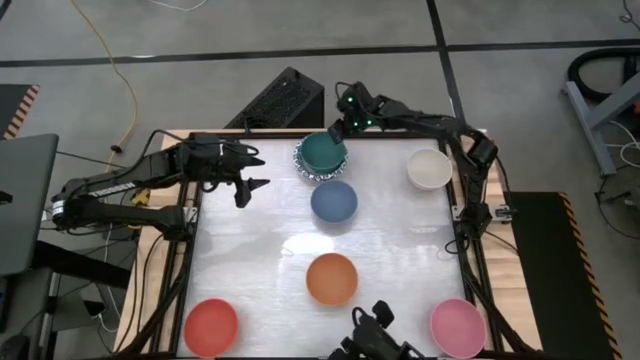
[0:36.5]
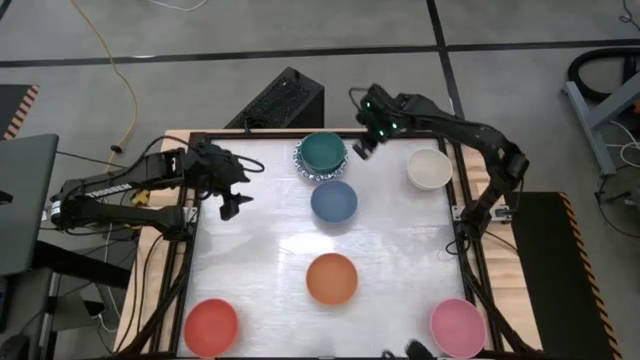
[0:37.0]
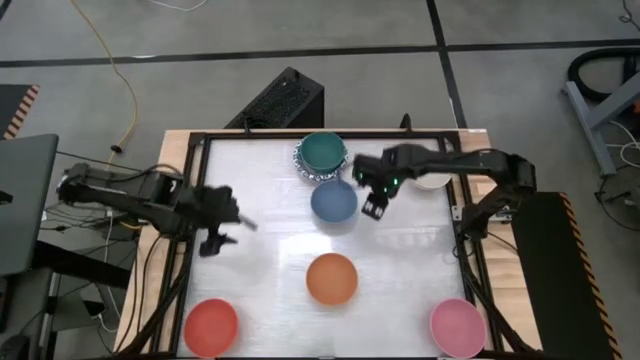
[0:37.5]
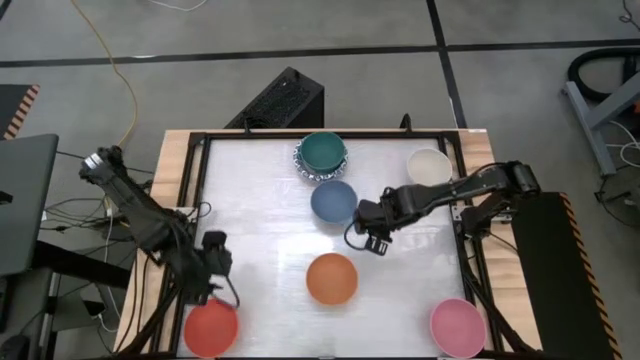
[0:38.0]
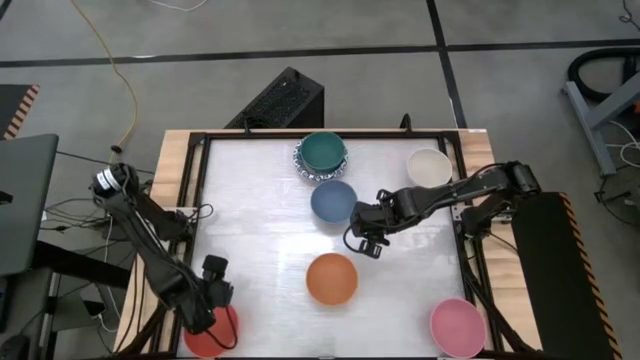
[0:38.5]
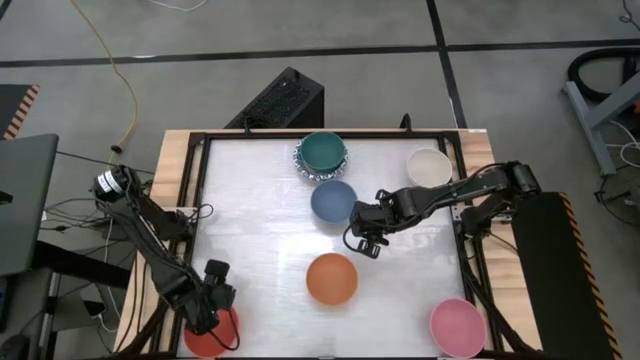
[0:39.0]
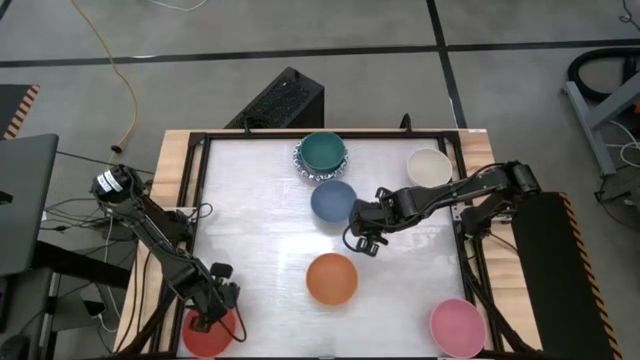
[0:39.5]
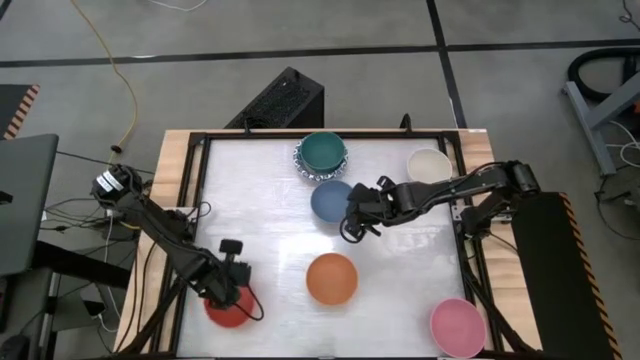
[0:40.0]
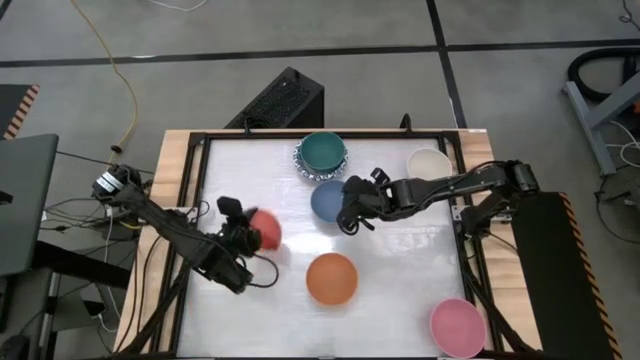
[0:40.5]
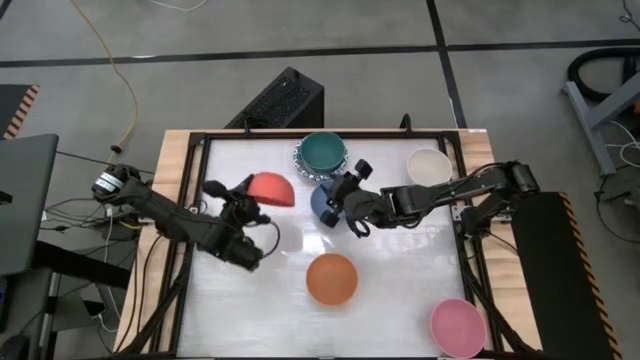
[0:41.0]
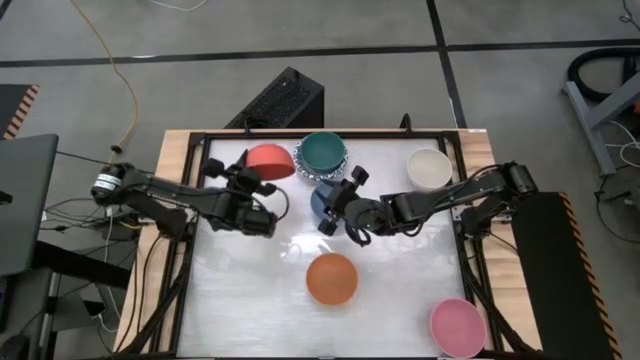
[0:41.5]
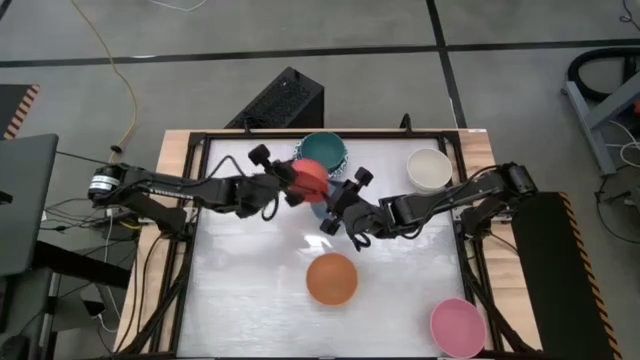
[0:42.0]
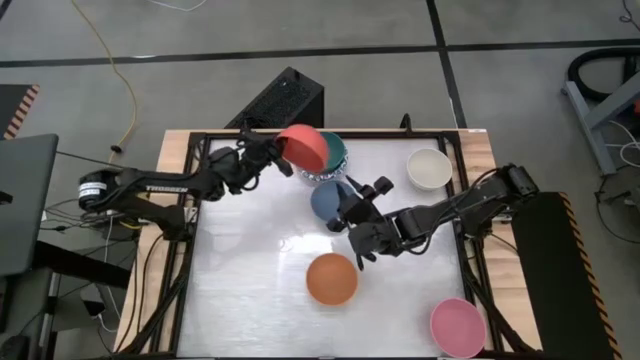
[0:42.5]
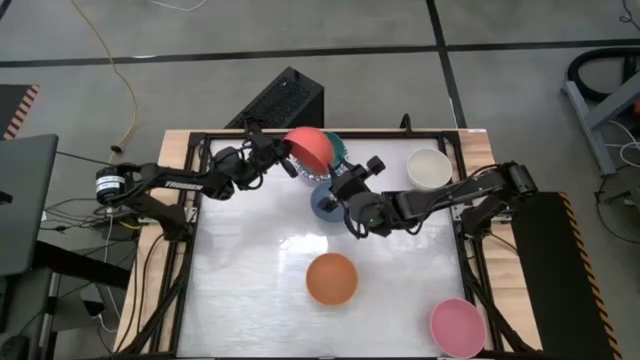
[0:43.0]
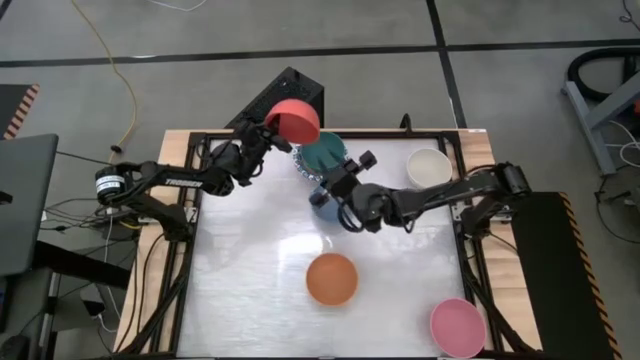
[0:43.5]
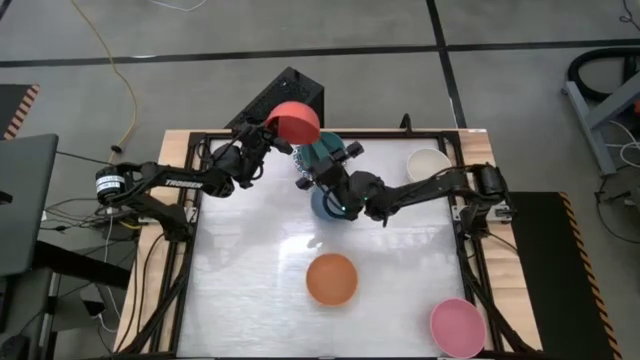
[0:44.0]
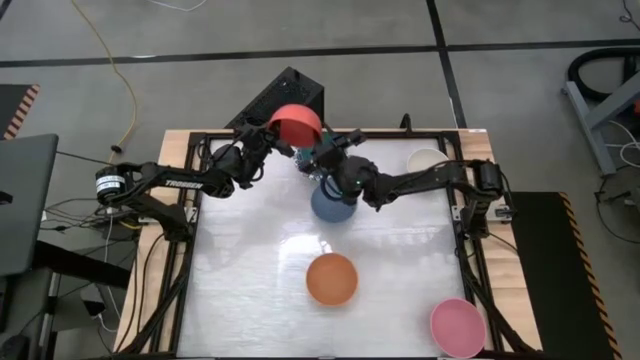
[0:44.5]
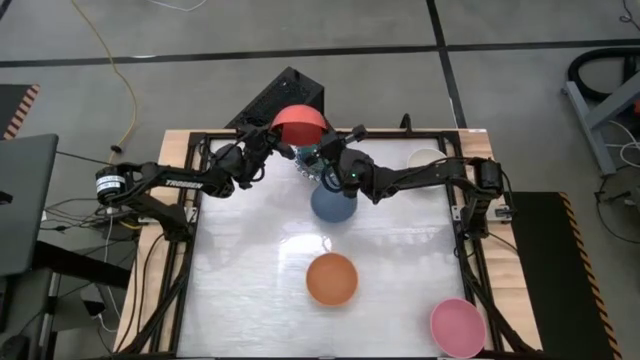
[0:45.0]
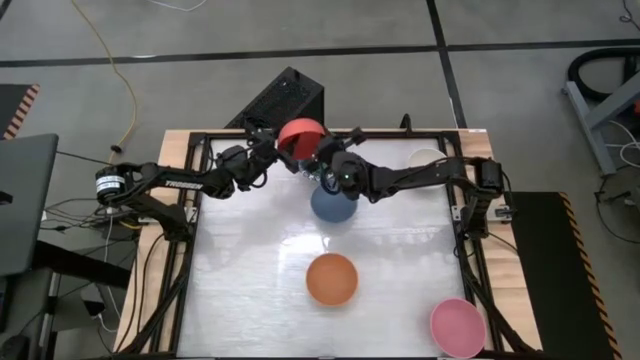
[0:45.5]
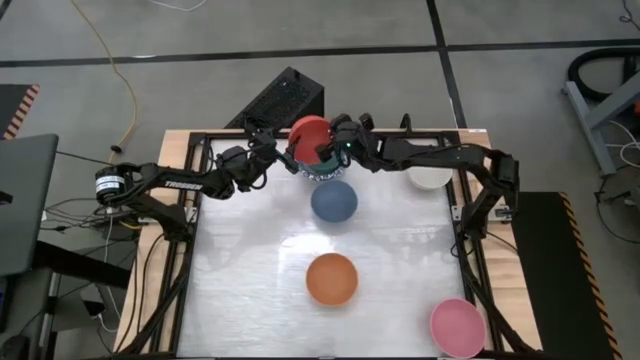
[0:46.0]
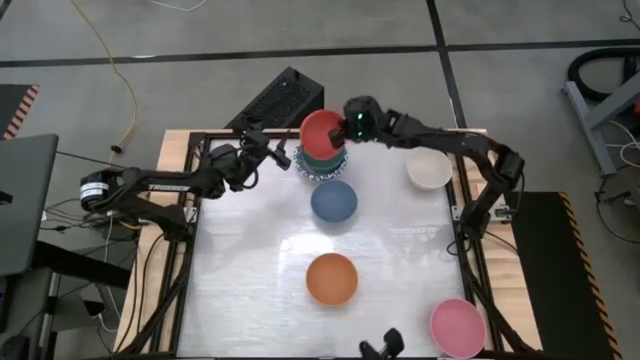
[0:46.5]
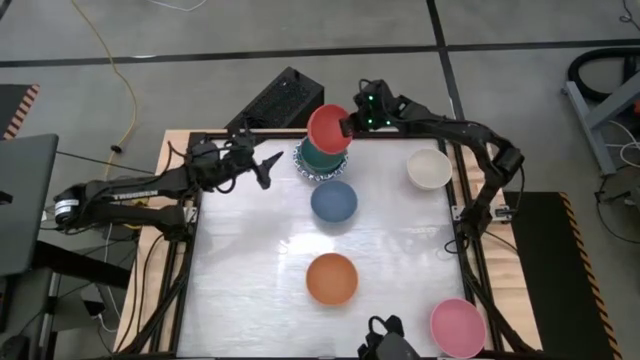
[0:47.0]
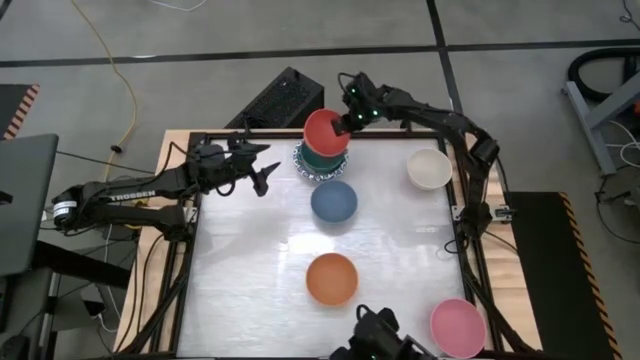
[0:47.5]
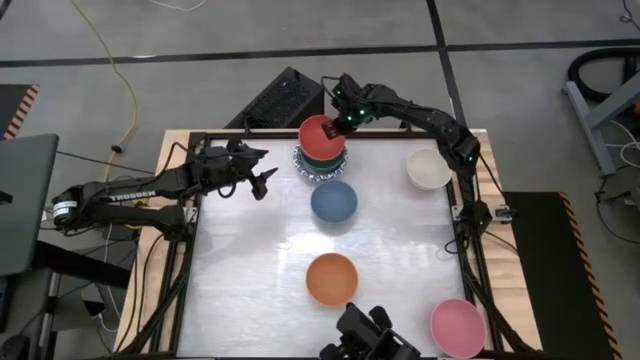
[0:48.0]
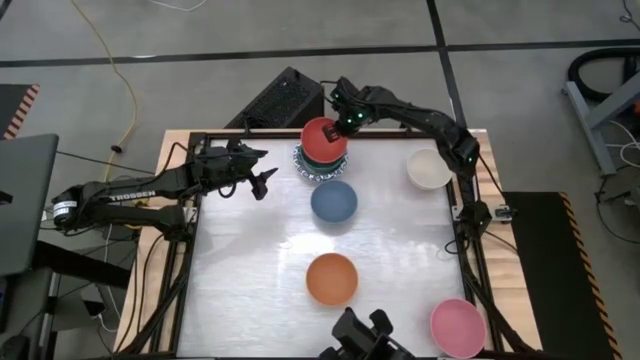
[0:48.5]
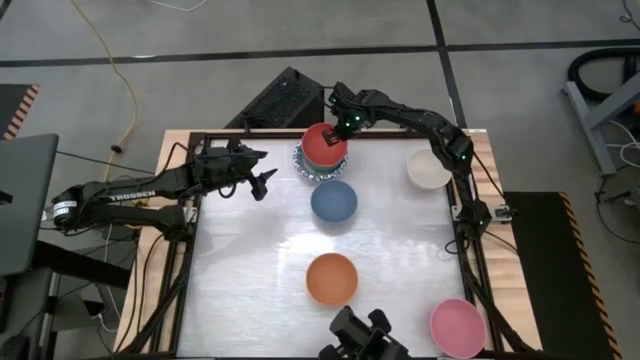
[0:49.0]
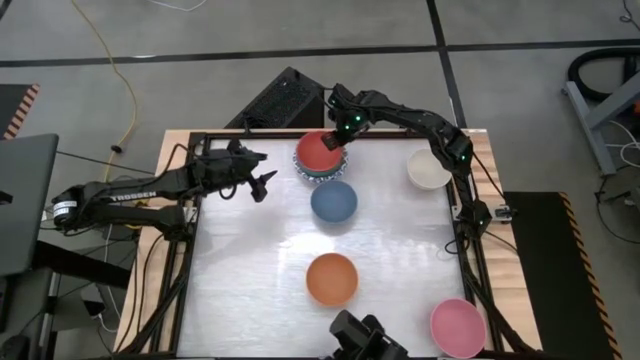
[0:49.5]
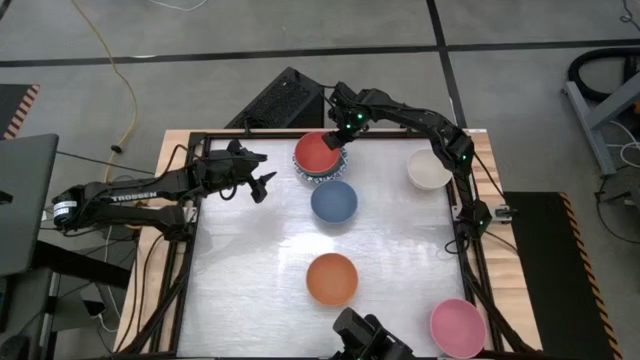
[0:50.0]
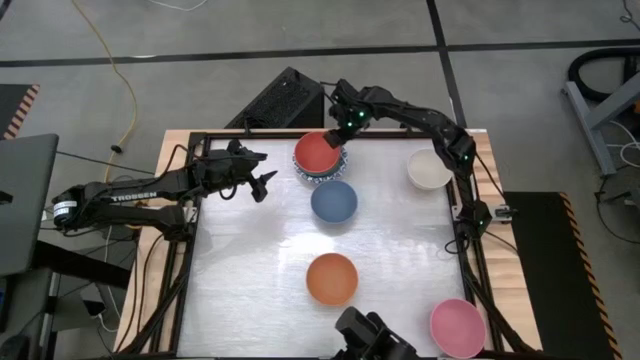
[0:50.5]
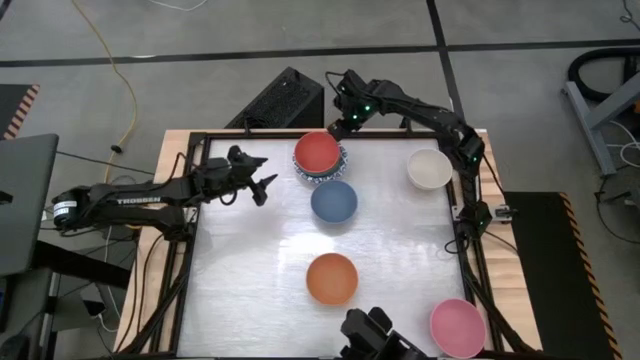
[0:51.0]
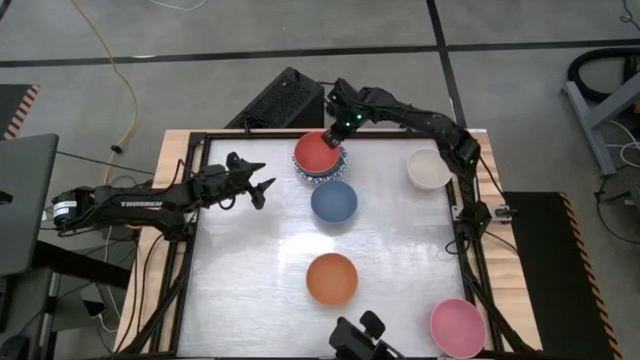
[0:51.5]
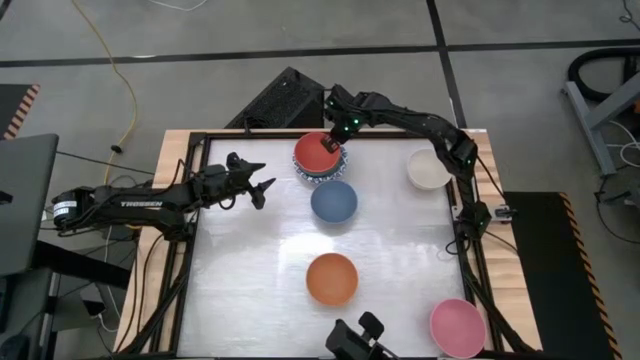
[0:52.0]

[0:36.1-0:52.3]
Stack the orange bowl on top of the green bowl

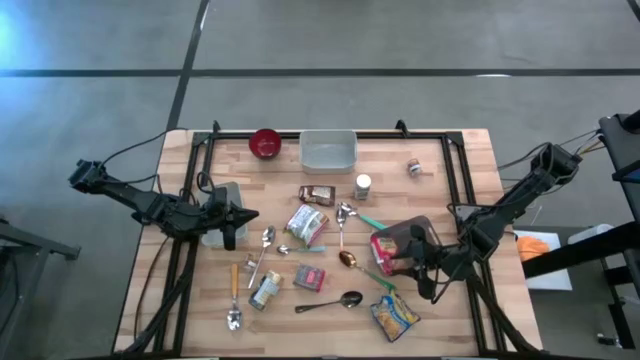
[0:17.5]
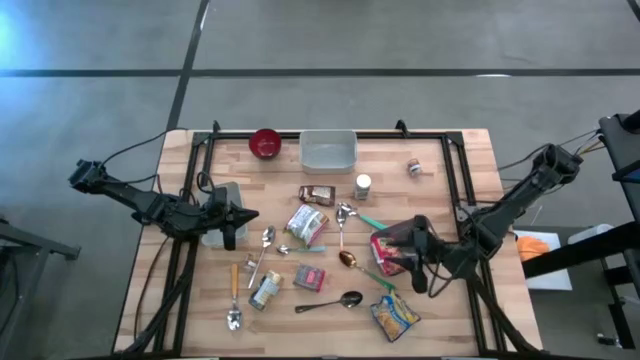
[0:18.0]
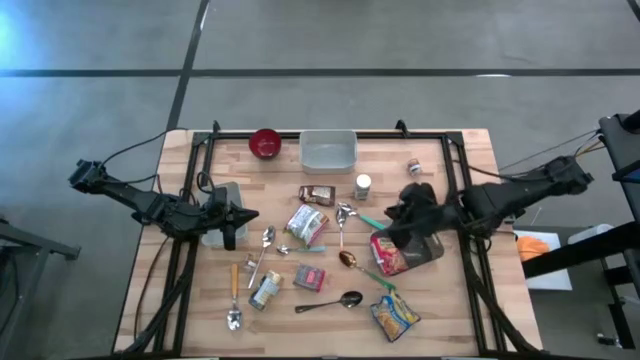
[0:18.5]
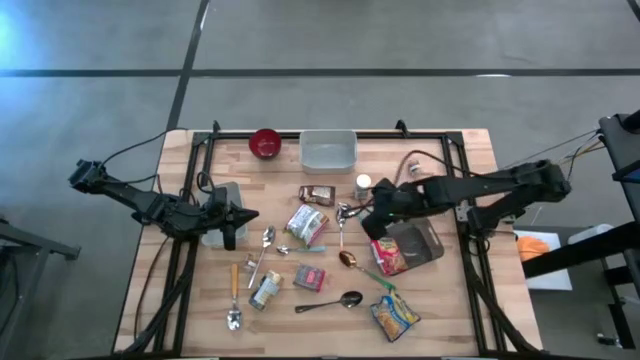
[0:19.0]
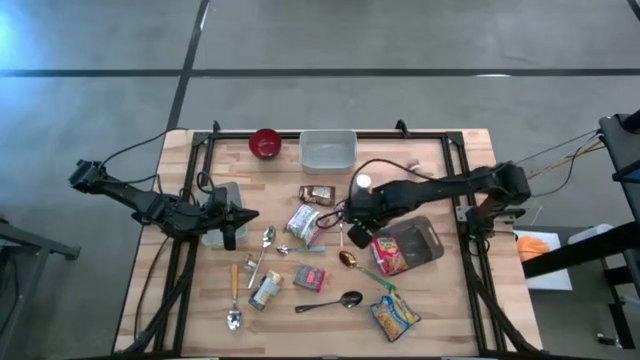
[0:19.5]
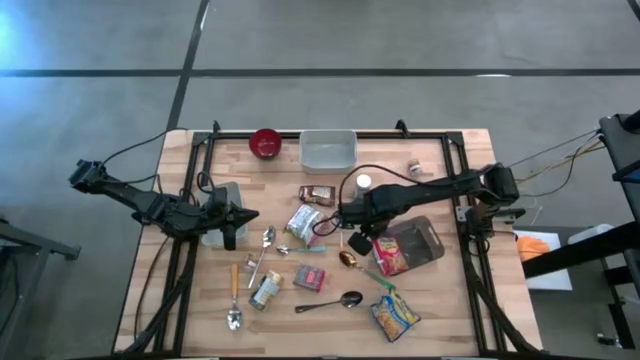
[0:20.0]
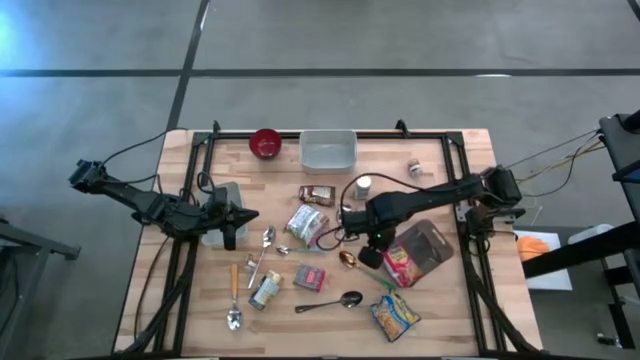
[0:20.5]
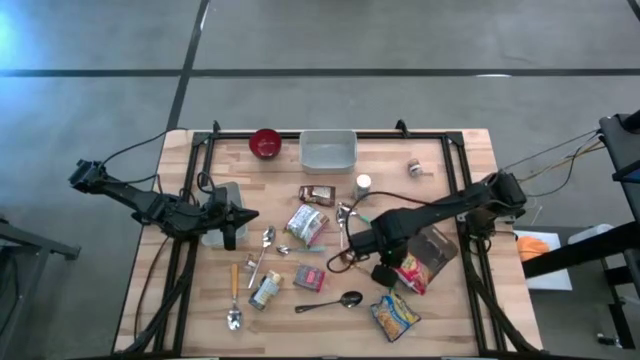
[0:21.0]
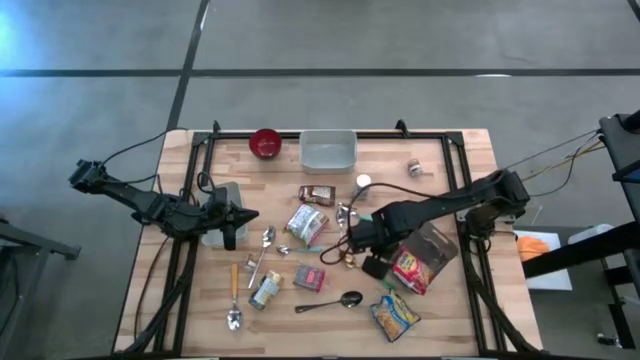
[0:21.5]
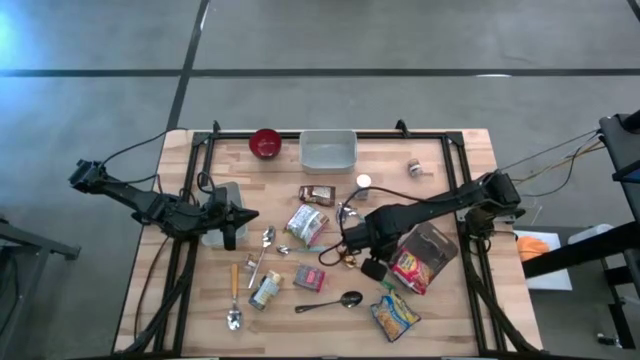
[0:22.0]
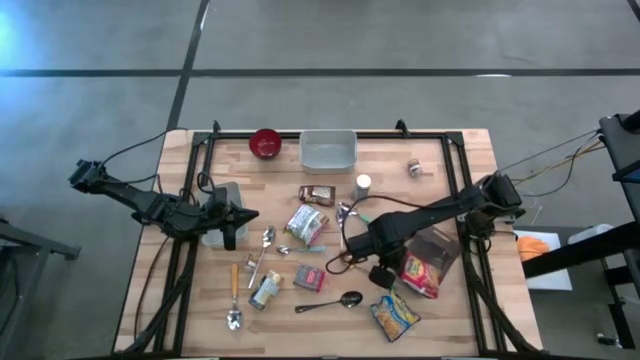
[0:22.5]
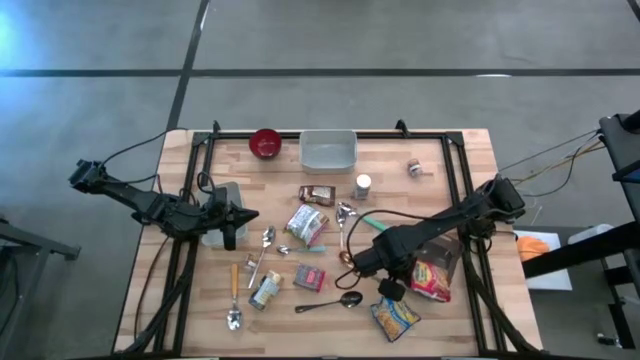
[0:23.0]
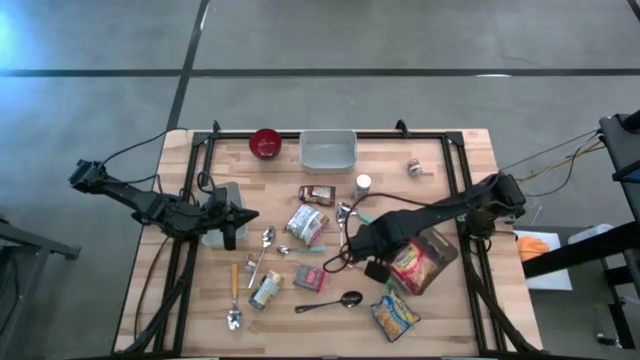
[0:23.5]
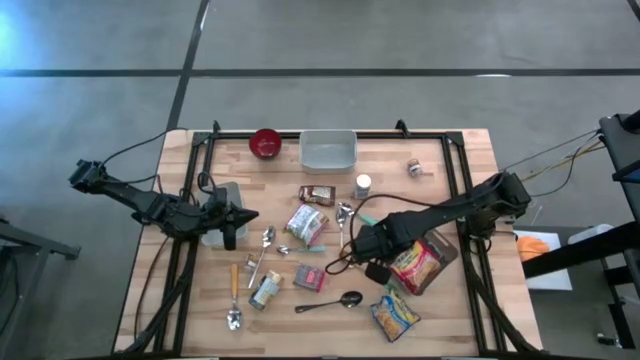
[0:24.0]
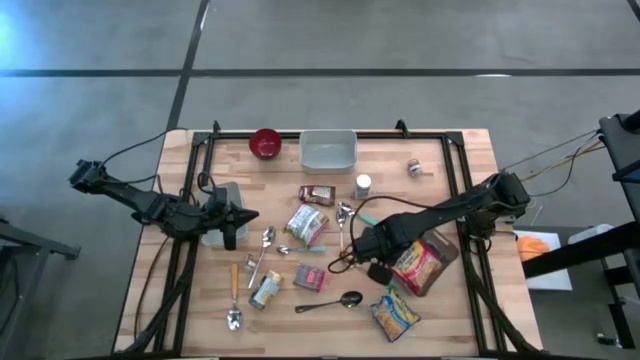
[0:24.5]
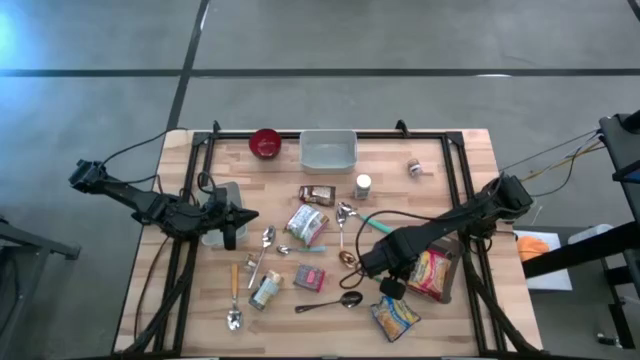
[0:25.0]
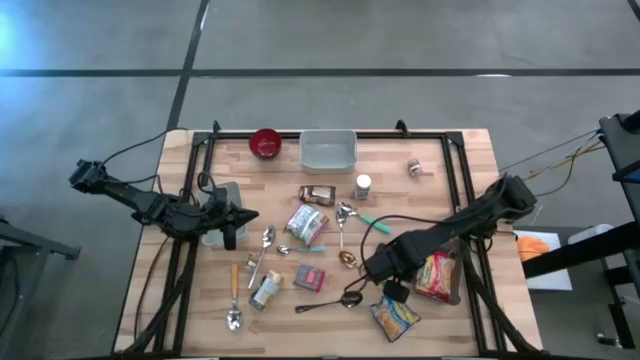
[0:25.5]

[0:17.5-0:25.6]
Adjust the black bin
